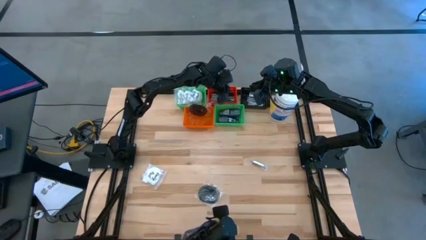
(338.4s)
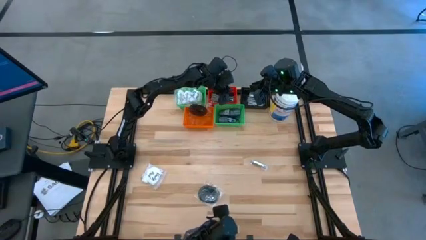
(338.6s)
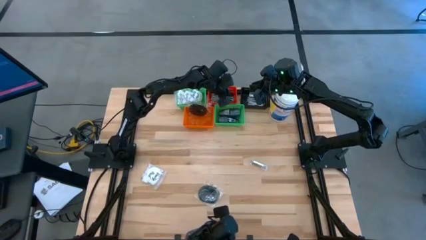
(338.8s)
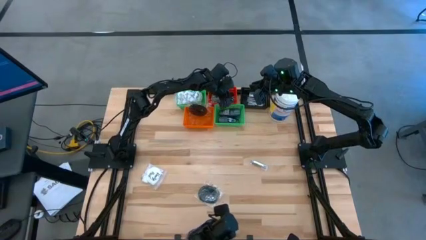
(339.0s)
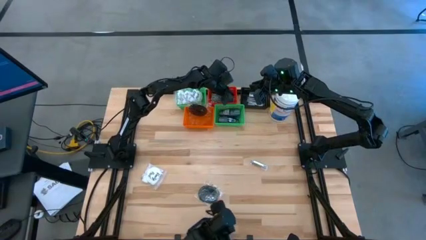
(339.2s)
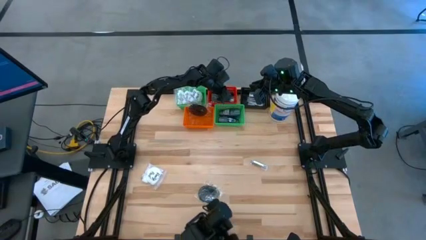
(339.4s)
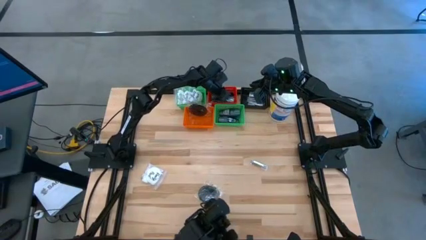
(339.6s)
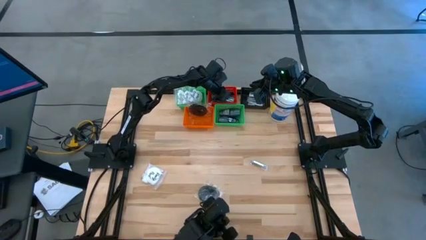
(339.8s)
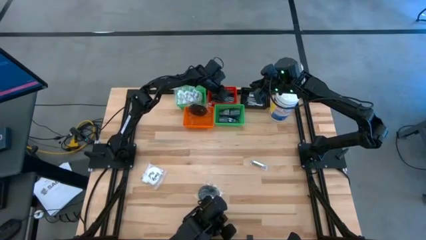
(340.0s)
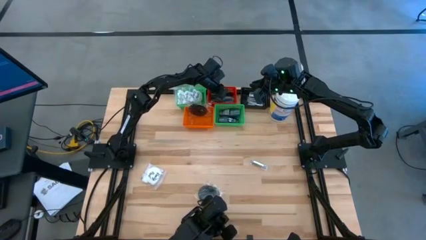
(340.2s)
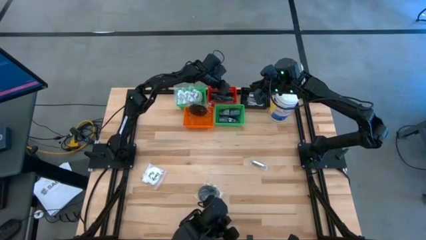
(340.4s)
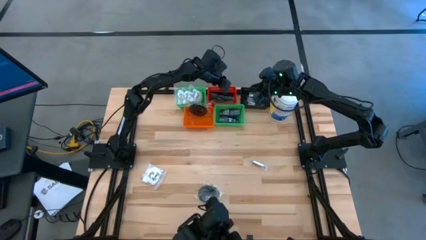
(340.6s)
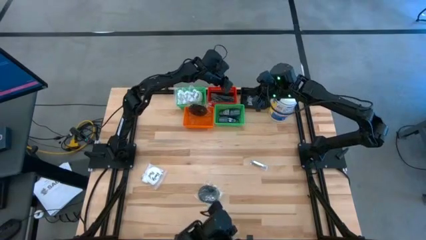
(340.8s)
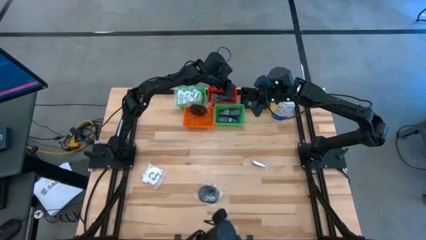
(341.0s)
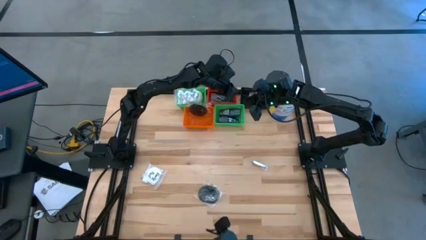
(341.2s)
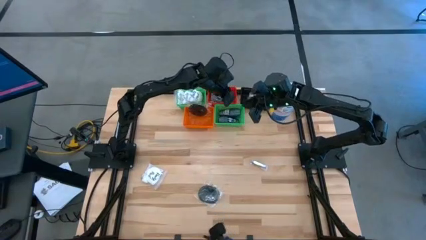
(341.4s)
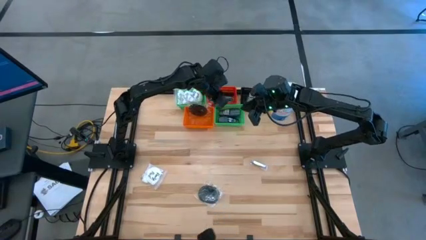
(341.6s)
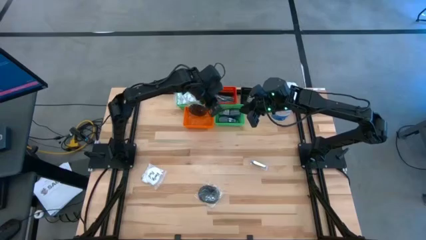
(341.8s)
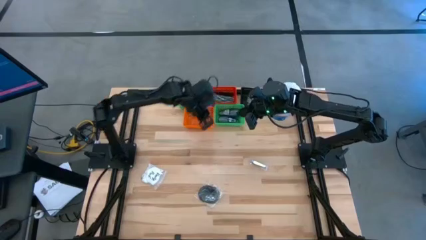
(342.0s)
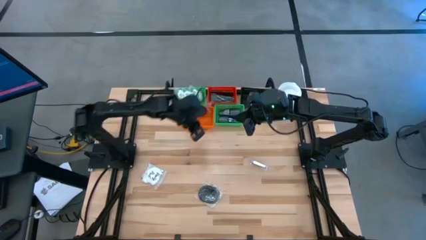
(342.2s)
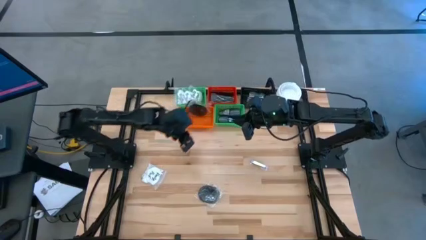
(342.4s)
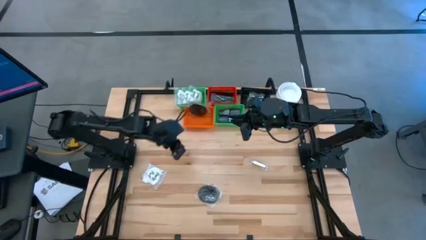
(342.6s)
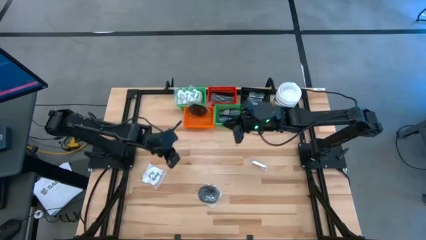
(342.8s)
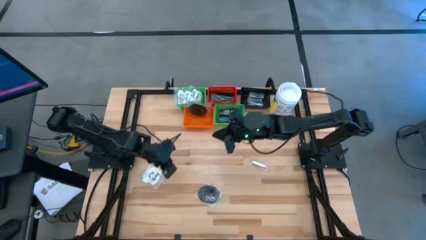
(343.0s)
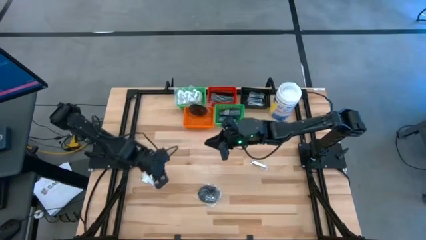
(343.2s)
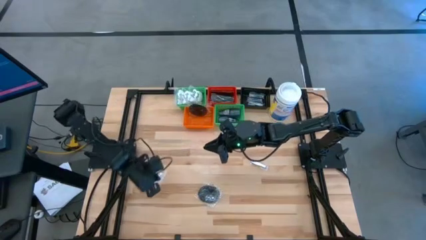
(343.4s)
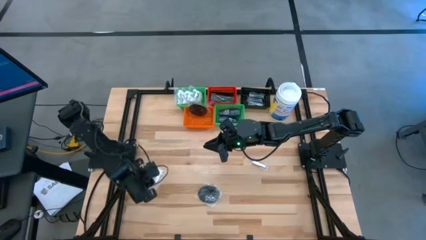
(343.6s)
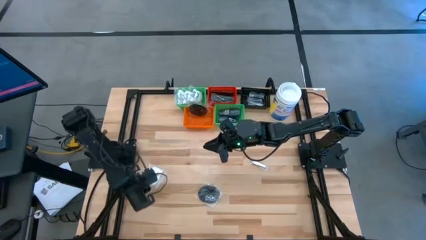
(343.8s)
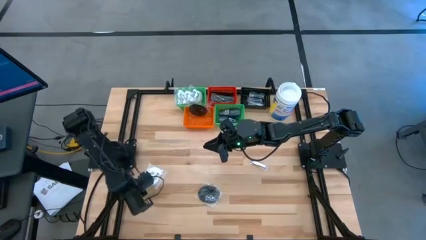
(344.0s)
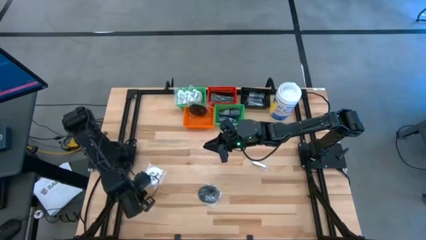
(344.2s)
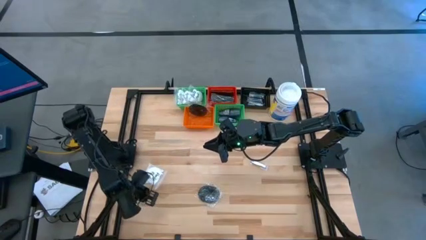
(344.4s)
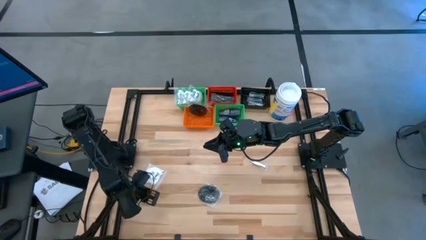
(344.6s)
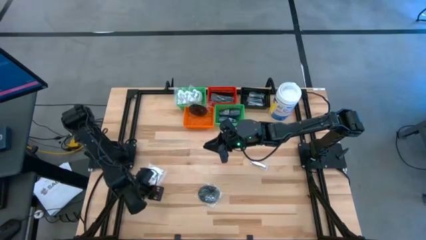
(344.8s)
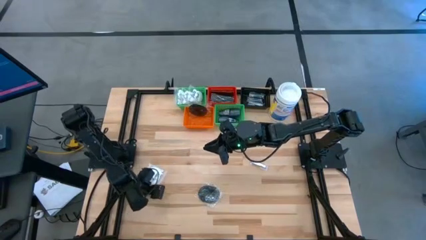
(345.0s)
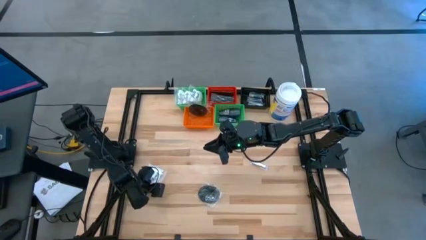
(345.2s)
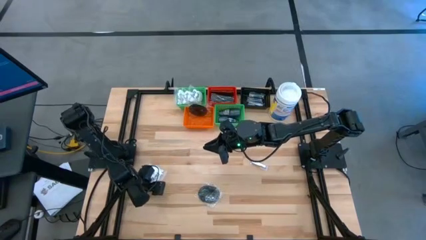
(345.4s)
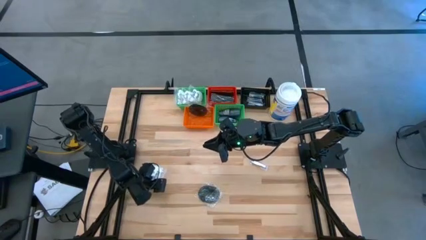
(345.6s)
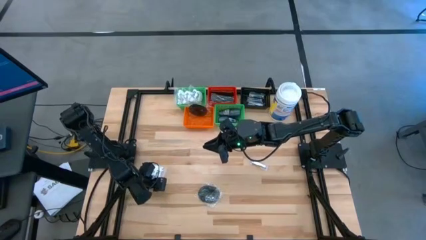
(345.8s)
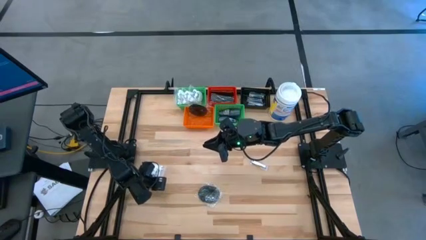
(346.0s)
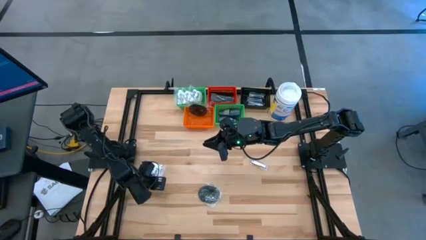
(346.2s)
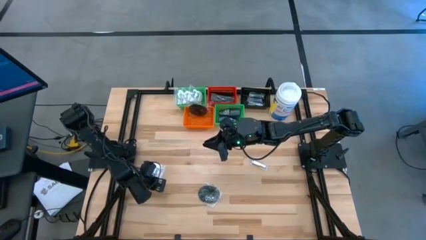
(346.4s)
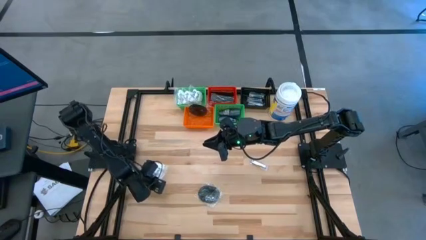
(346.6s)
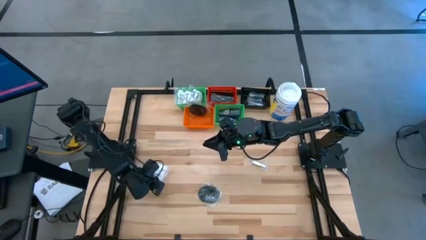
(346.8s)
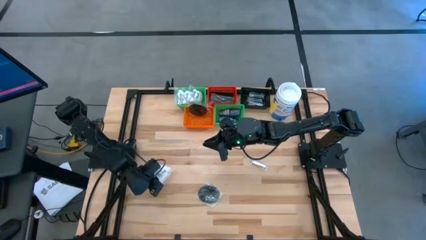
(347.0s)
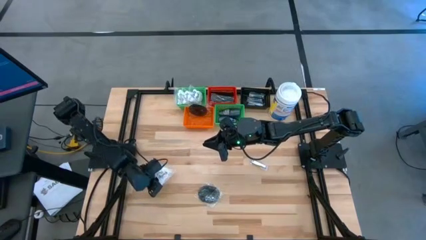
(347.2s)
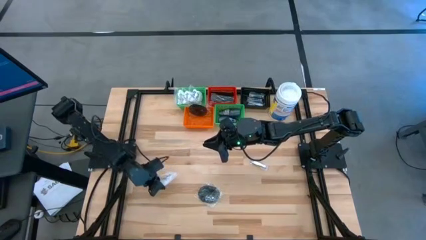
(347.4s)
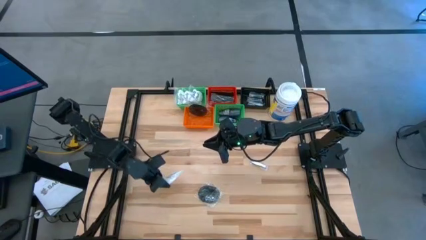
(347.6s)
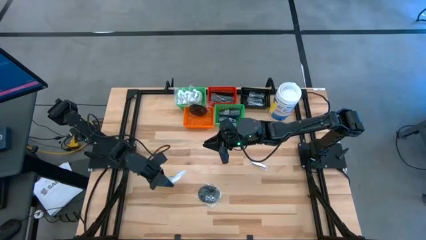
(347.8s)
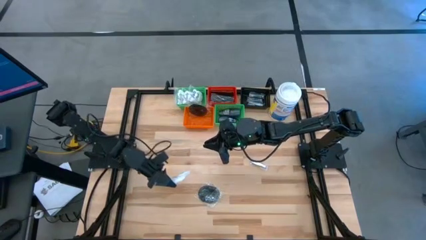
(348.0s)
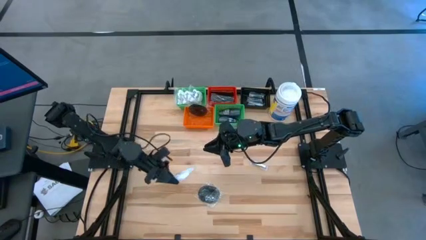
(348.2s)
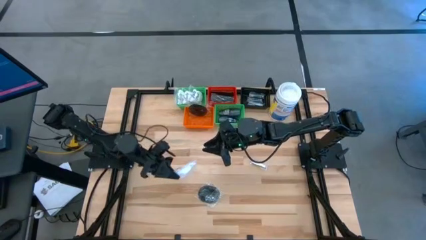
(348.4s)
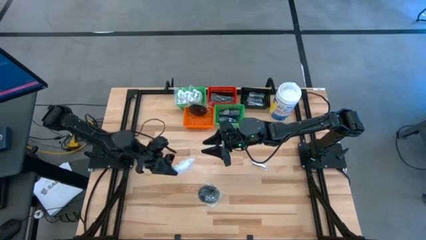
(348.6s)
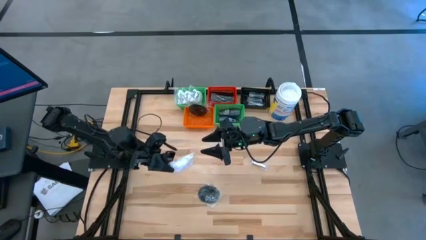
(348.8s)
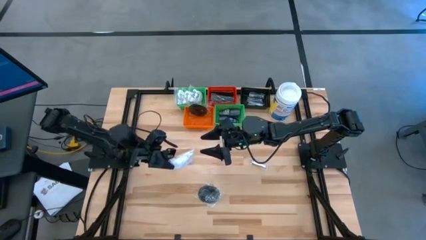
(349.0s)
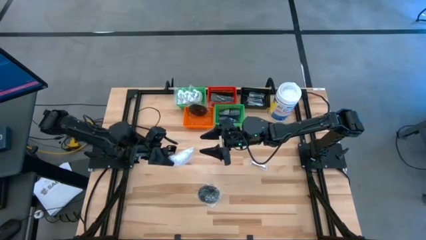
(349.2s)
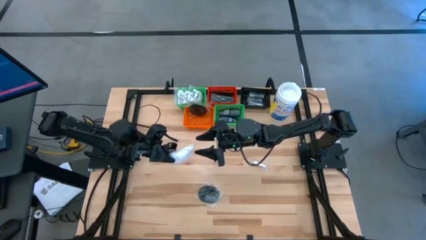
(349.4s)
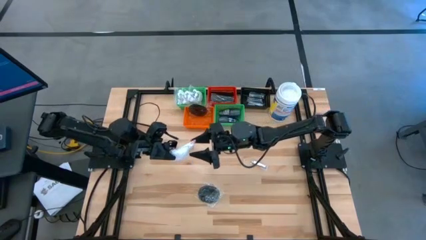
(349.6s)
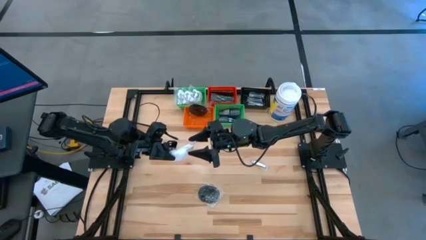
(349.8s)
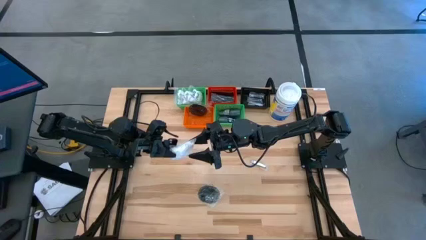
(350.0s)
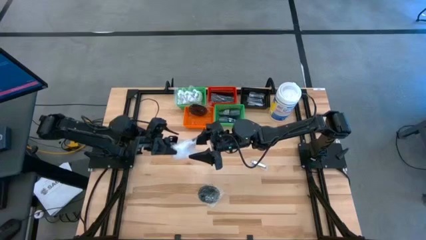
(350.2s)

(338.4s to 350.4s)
Task: Pick & Place Travel size toiletries
Put the vanity pack into the green bin

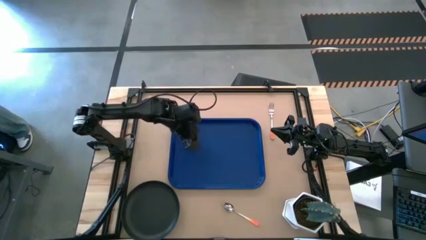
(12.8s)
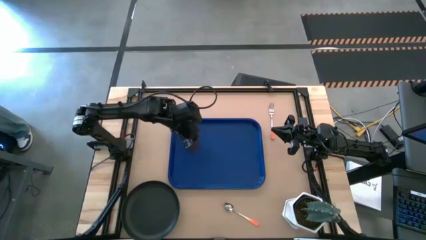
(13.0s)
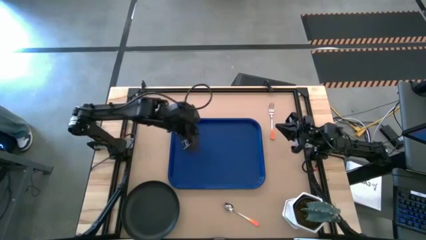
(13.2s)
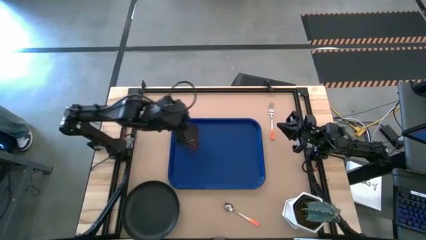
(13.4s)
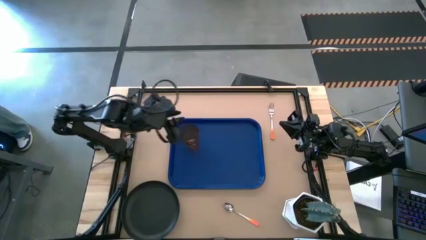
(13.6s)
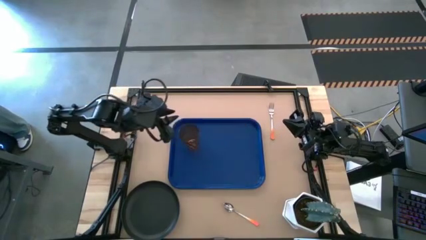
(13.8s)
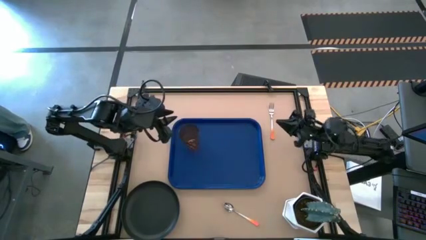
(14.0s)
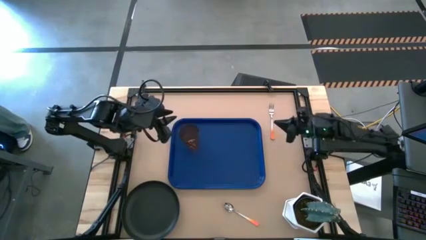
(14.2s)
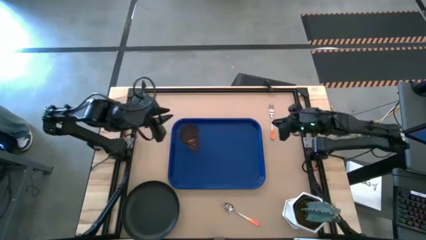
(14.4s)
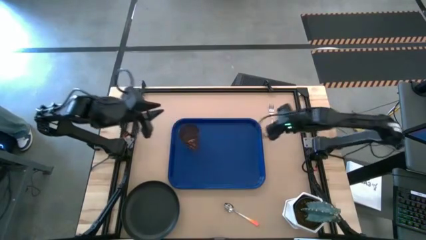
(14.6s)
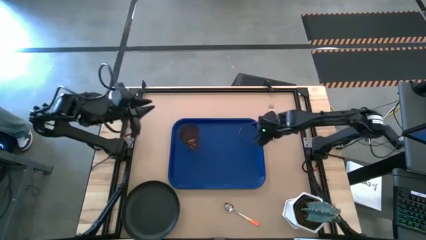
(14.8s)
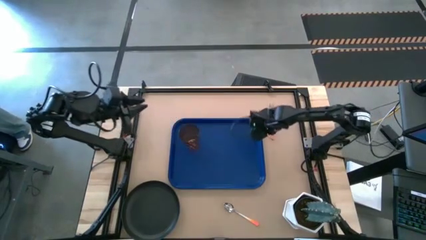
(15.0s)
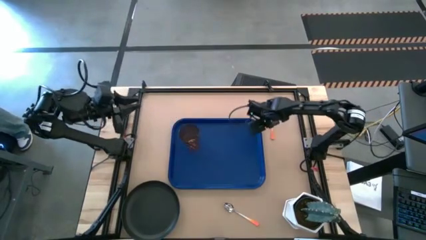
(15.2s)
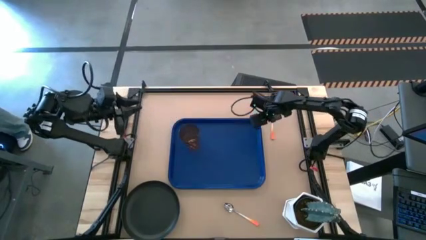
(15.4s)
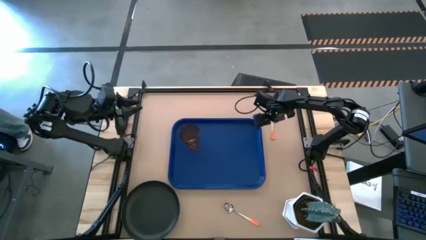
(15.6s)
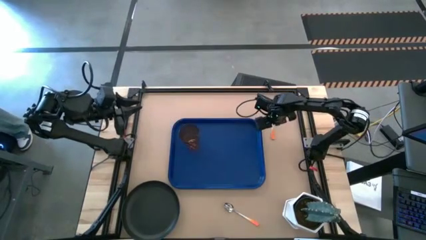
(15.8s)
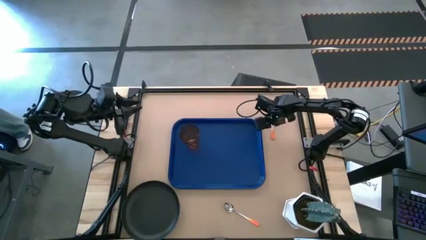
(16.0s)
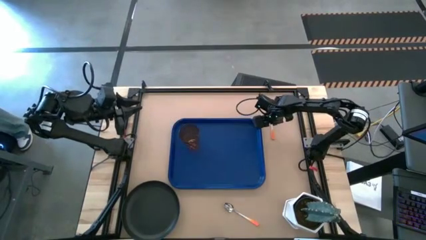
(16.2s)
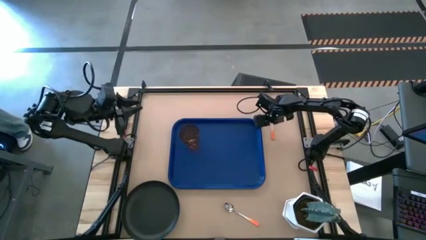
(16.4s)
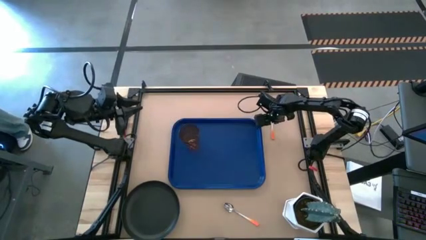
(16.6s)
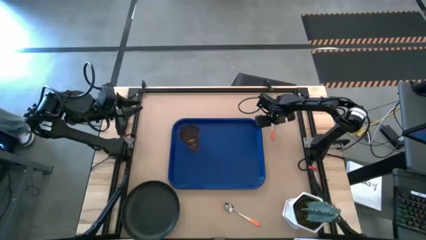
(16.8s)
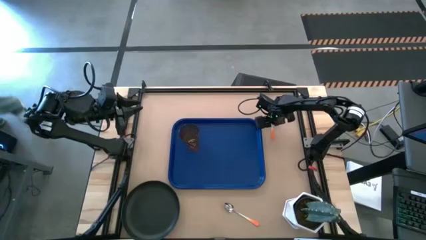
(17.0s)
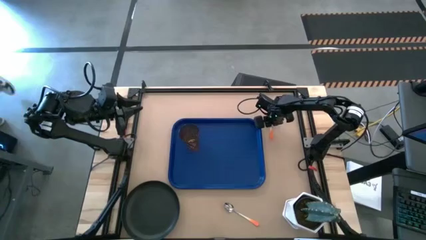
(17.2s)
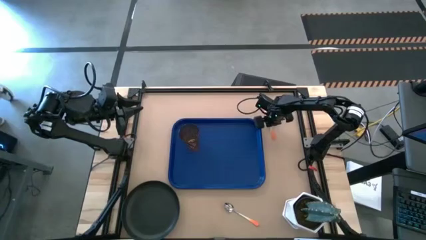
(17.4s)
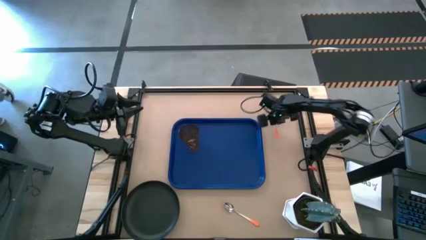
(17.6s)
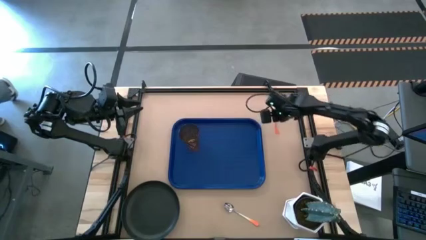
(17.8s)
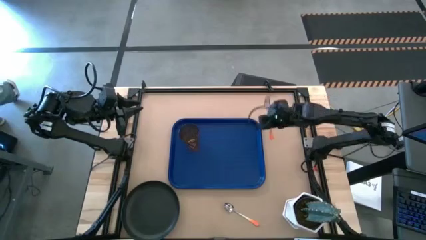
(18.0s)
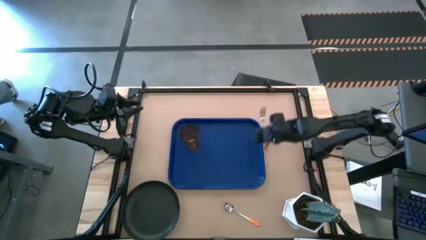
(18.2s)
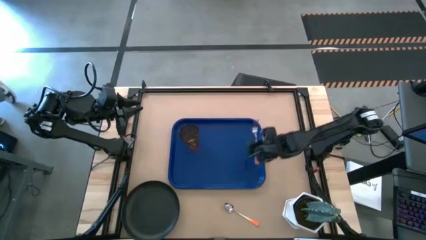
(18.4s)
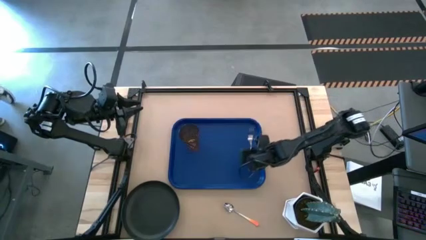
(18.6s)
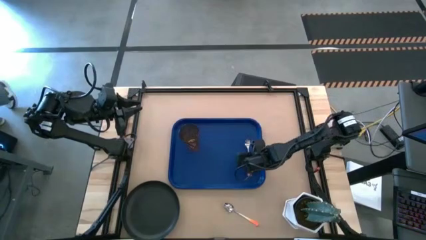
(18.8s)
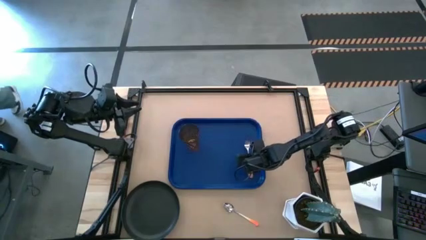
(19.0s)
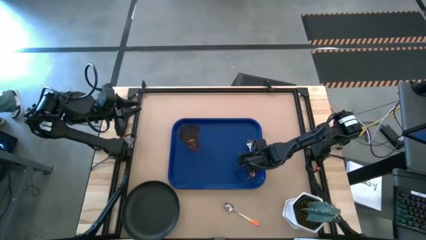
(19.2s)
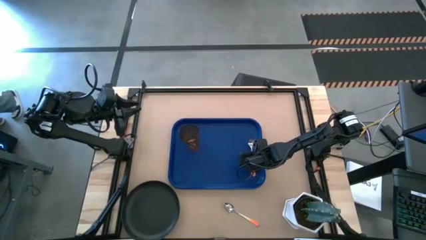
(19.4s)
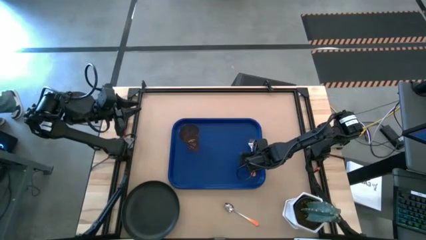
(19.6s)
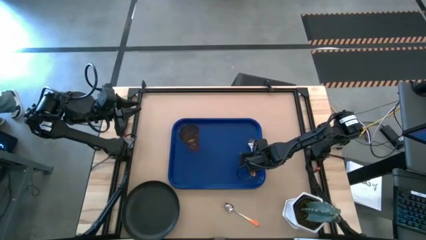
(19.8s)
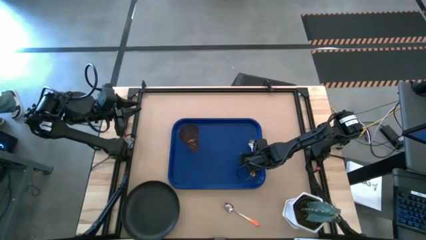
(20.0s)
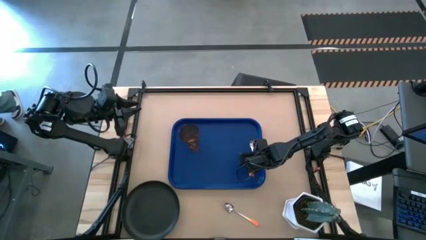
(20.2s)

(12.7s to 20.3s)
Task: Pick and place plate/cup/fork/spoon on tray
Put the fork on the blue tray
